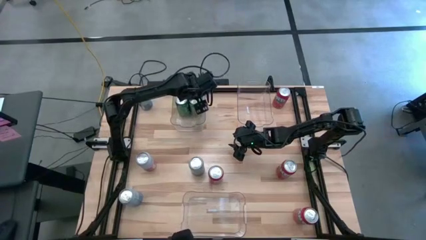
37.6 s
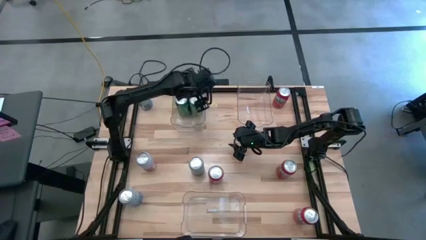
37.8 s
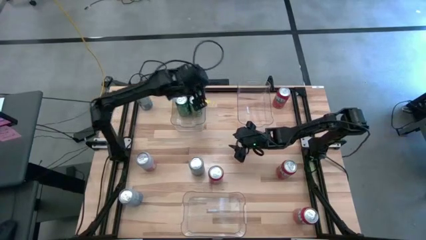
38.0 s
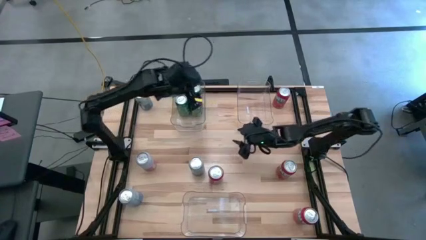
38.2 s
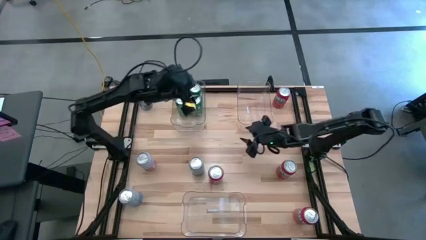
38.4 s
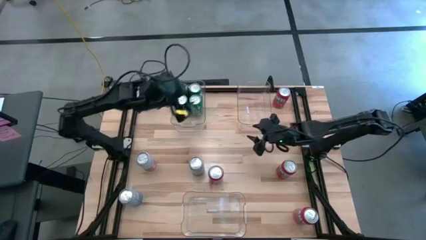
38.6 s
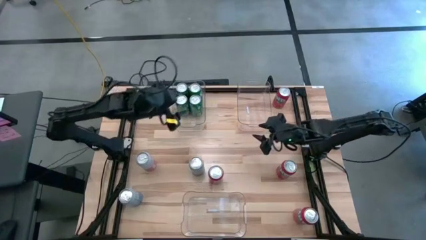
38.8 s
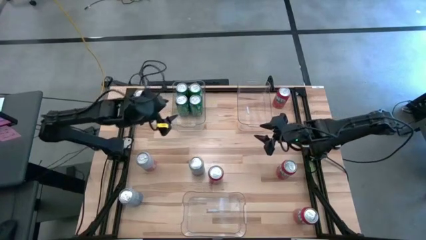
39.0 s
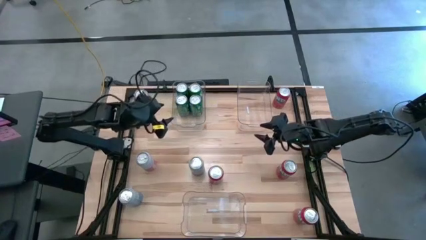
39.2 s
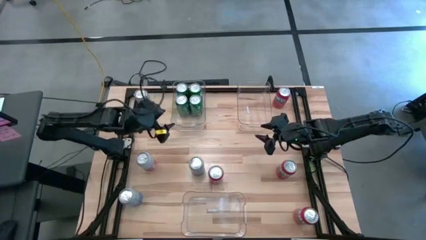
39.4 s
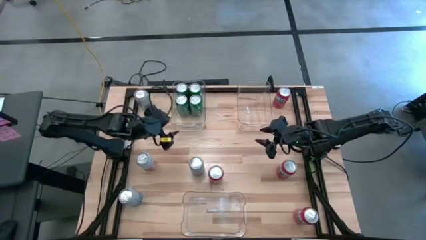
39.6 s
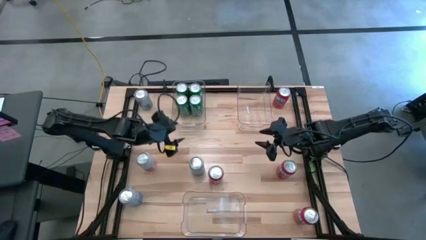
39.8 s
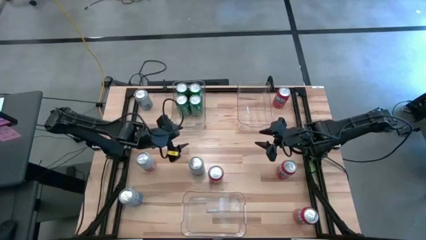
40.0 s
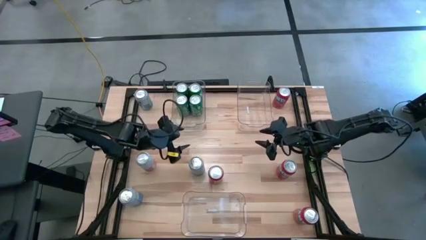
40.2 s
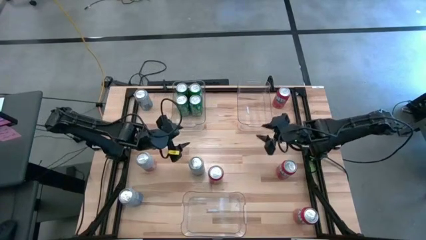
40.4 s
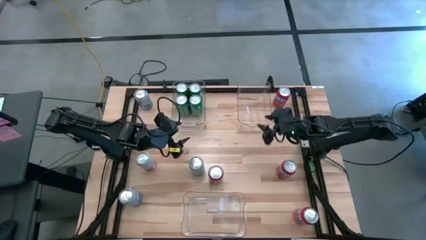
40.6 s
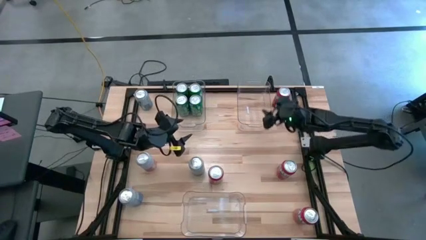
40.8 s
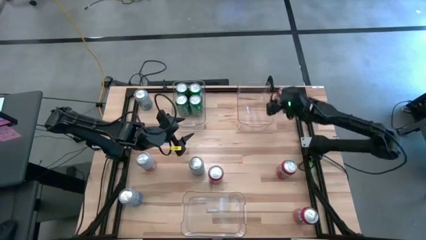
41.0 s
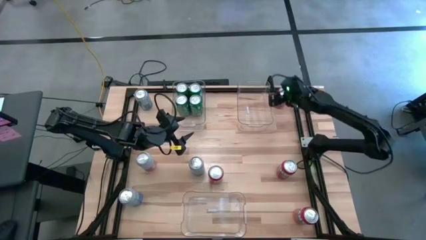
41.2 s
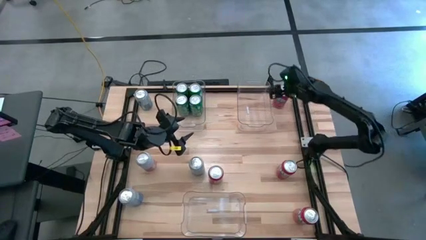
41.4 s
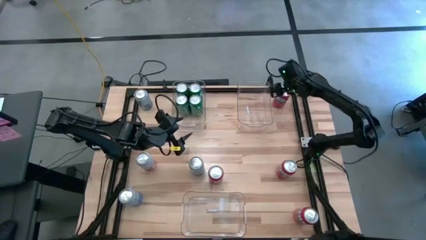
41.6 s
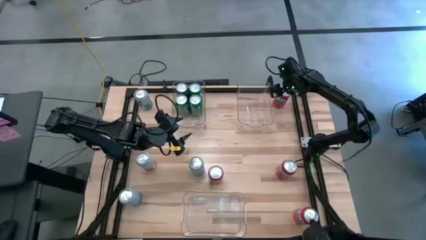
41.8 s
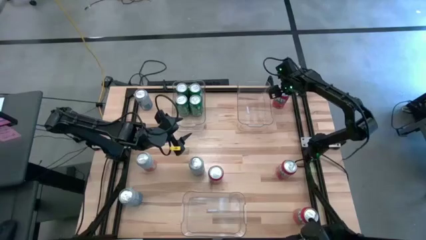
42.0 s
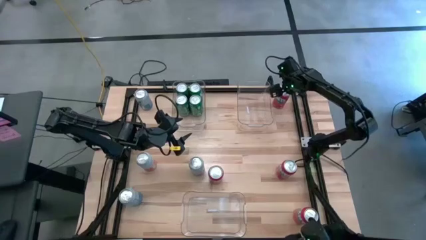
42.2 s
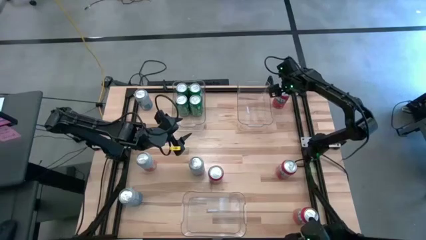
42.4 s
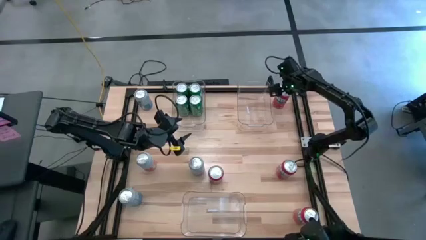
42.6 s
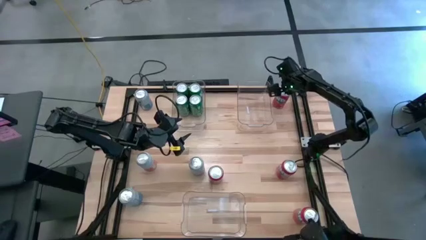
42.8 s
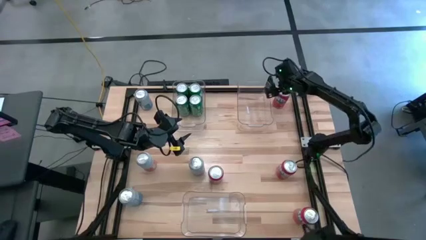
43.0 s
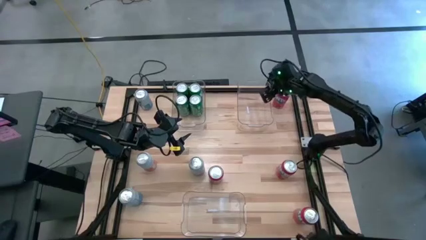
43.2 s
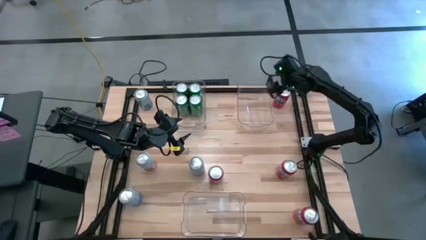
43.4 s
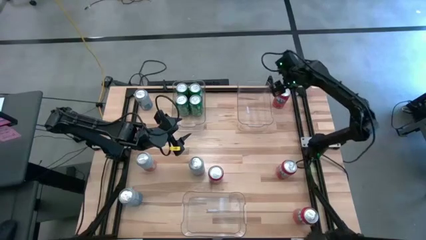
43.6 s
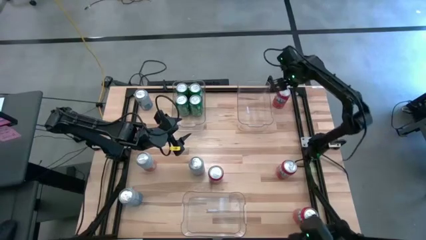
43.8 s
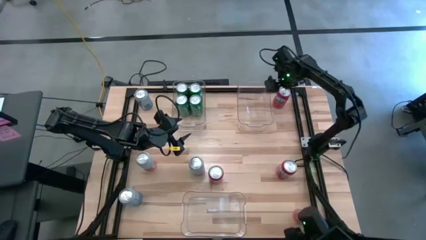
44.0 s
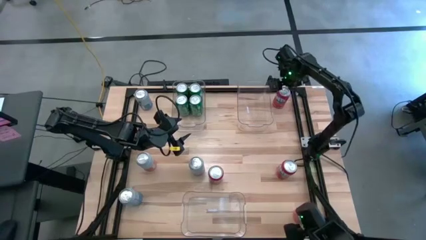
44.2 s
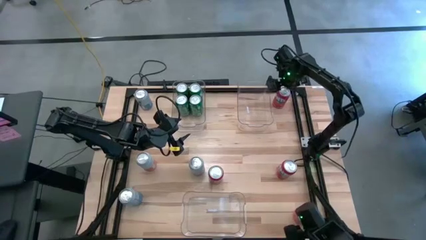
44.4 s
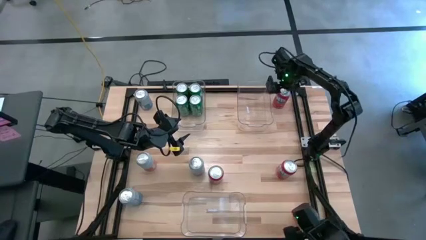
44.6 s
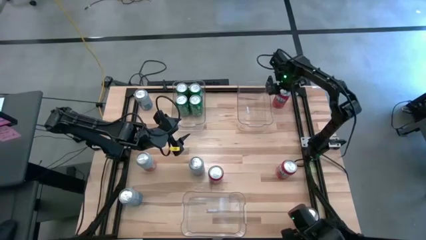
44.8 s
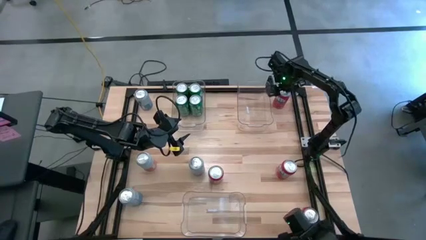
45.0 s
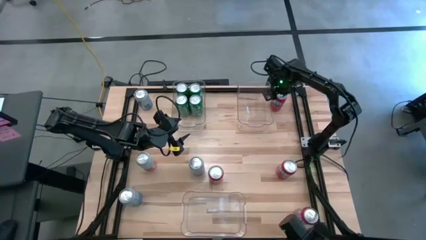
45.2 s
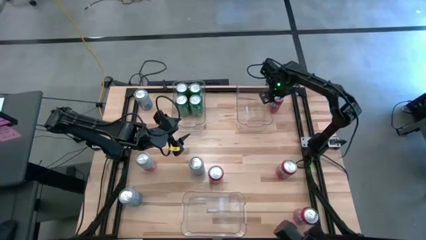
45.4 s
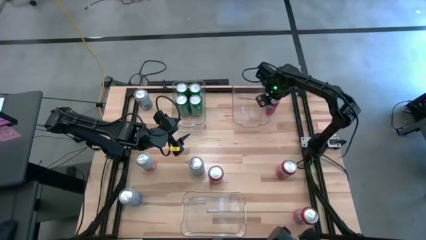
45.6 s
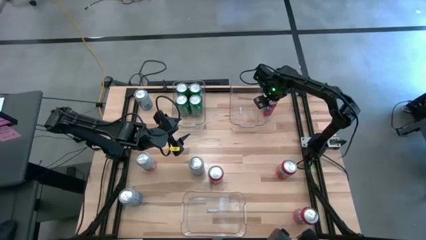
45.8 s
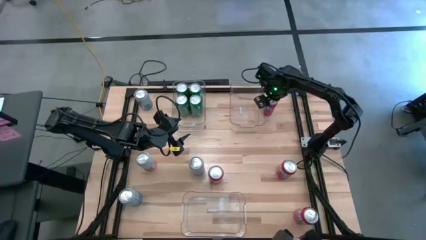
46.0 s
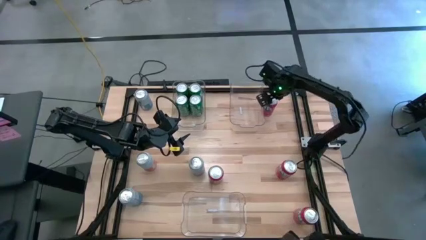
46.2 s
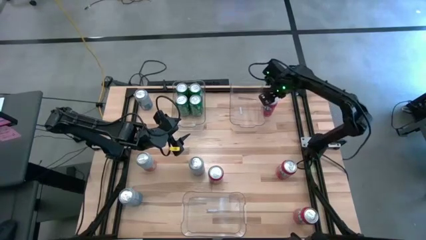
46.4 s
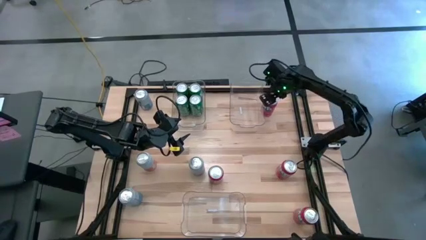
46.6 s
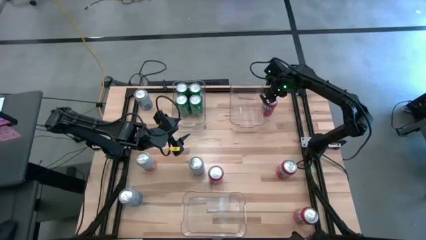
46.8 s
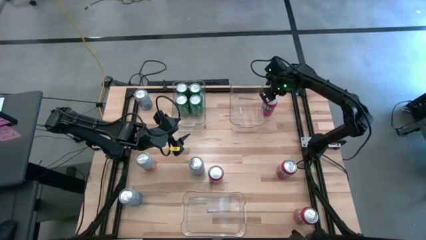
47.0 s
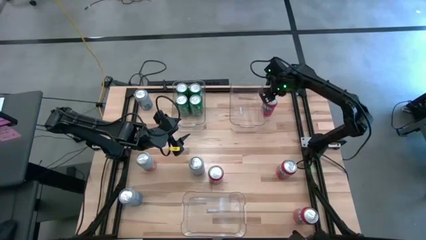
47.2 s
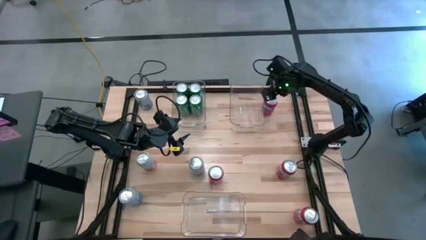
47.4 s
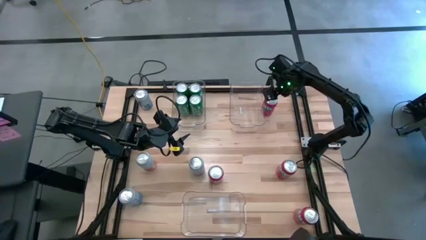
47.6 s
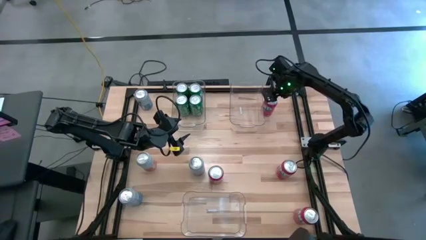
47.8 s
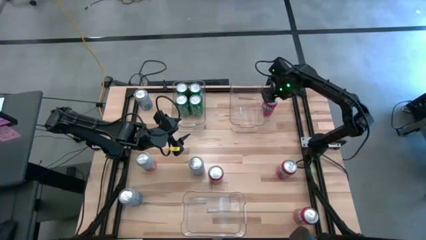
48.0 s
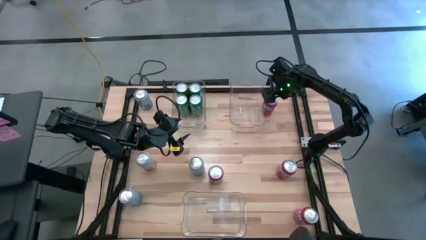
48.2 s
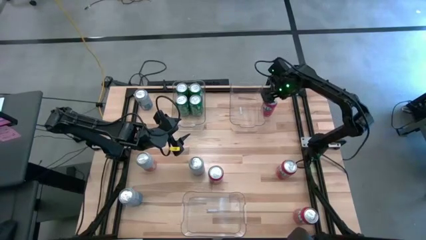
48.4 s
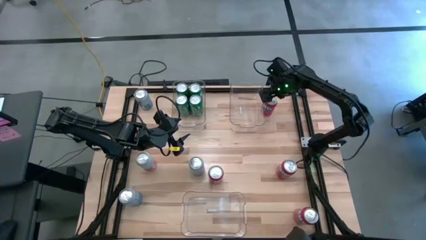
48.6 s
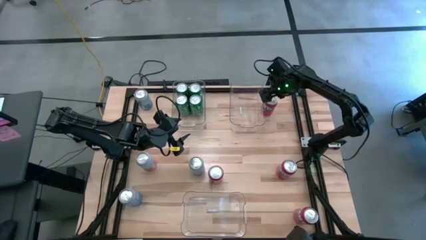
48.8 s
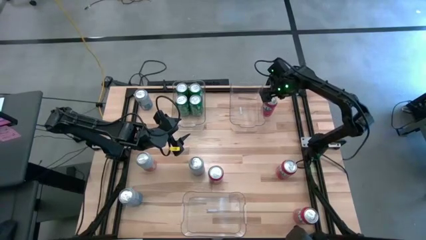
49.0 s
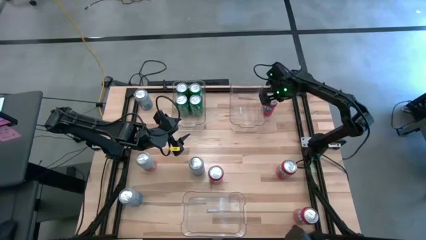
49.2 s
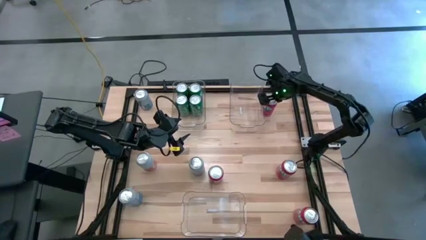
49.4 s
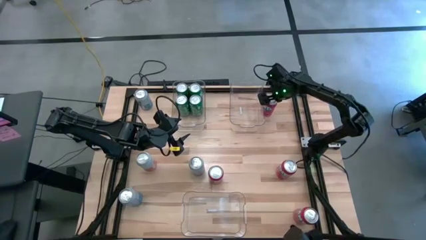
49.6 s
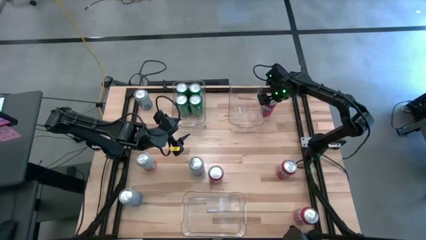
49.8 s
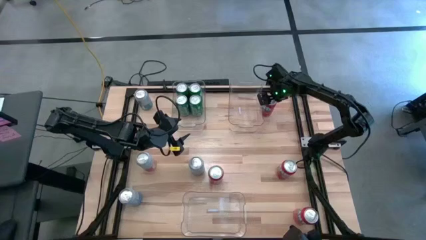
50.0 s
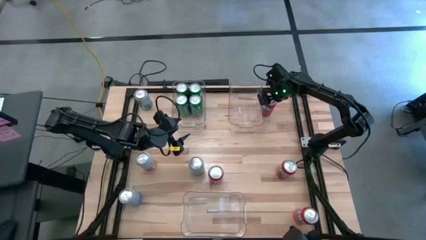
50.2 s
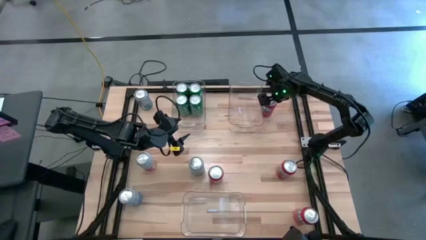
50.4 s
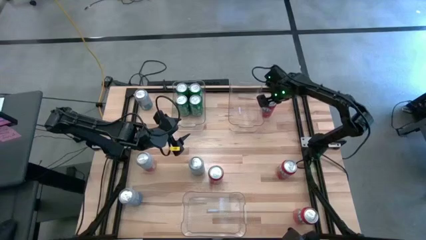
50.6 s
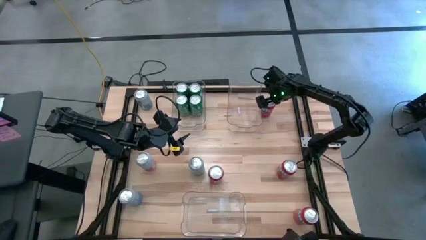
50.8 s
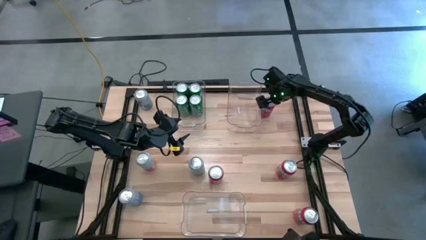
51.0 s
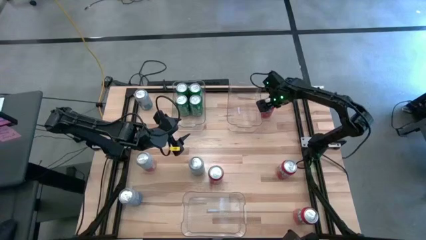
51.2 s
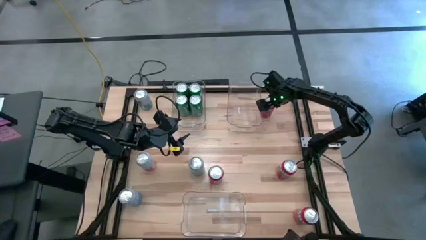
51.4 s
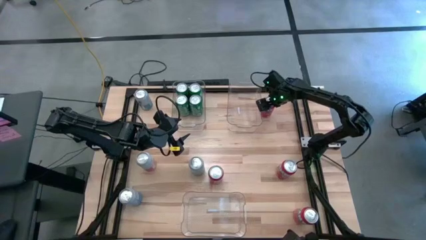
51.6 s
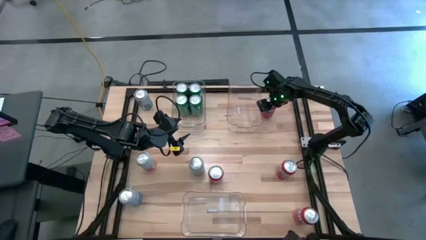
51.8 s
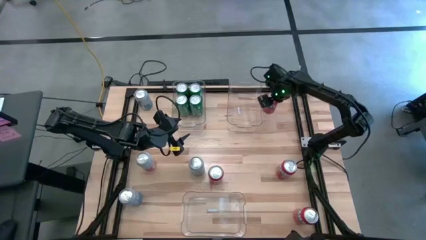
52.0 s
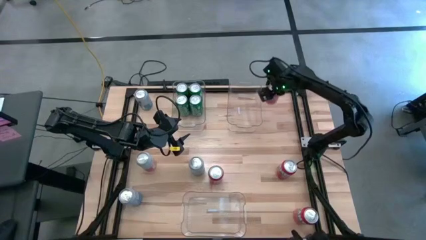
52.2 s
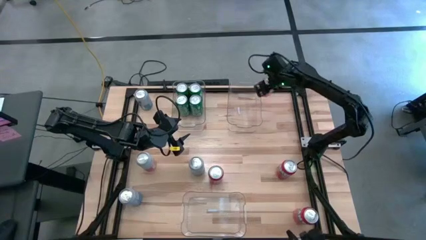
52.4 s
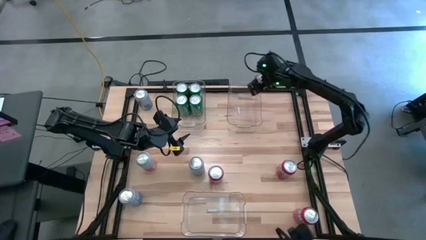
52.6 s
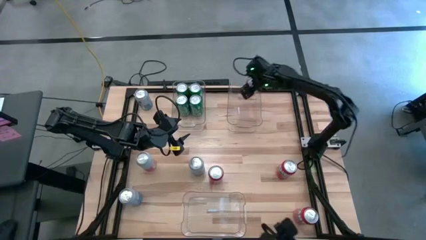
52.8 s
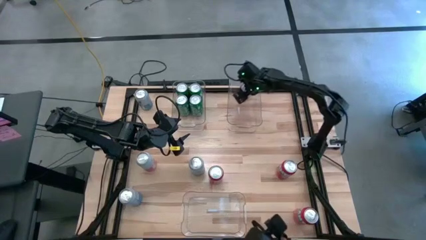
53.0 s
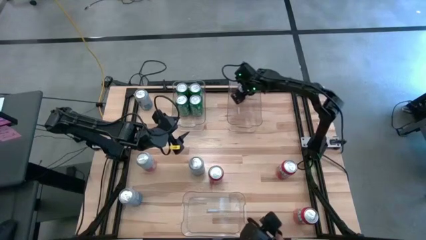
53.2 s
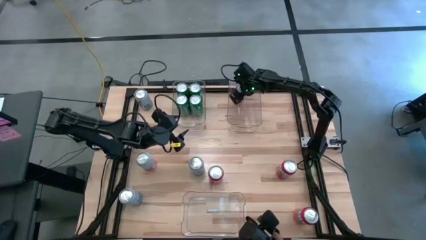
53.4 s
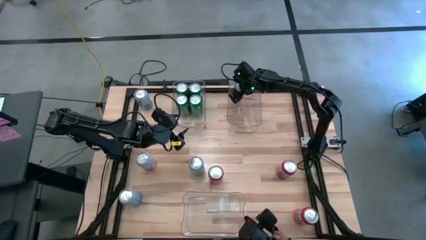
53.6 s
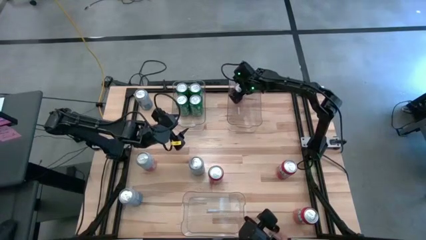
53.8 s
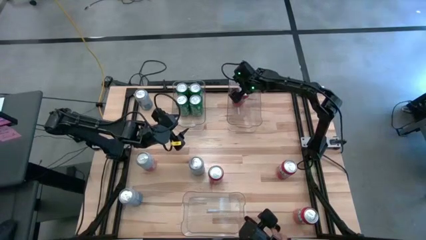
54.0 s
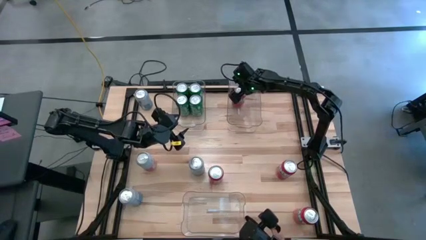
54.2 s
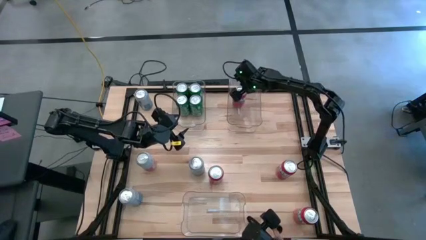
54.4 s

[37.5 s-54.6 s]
Task: Sort soda cans
Put the red soda can into the top right transparent bin
